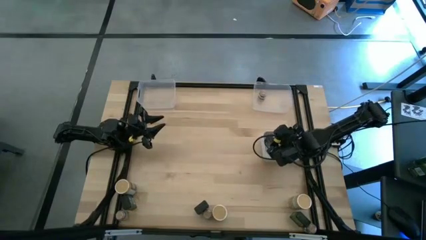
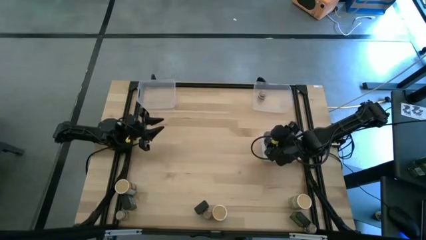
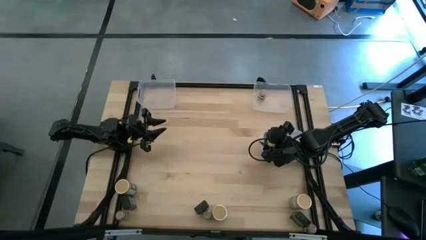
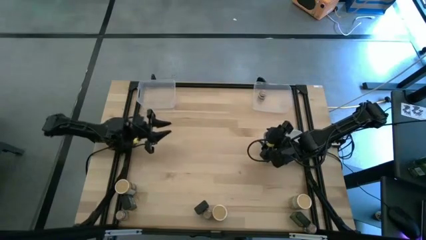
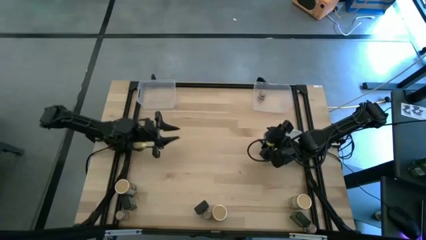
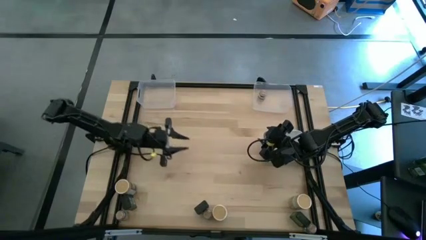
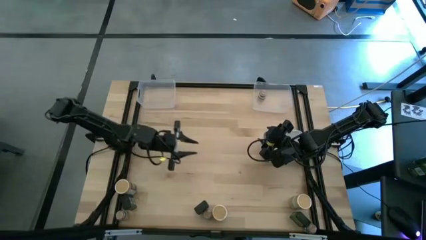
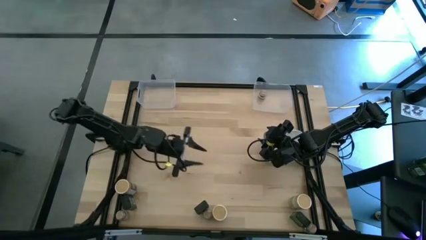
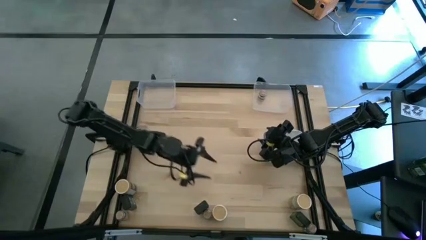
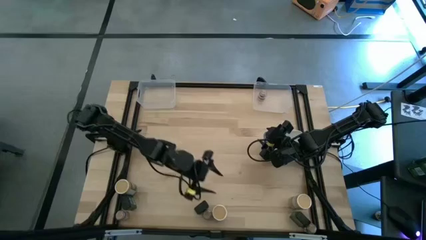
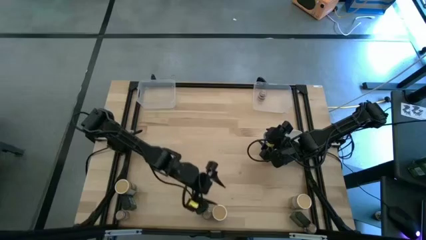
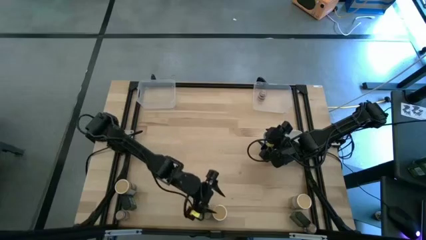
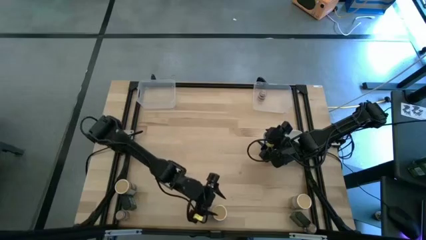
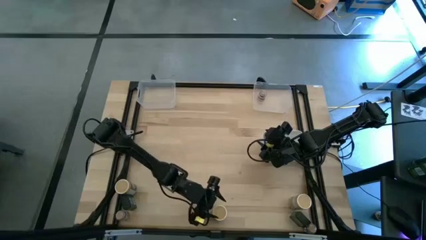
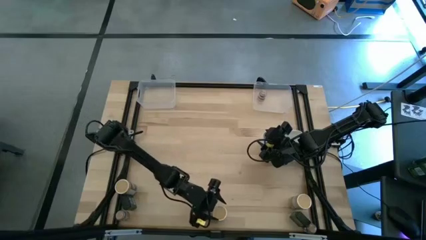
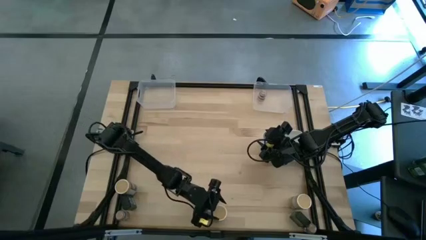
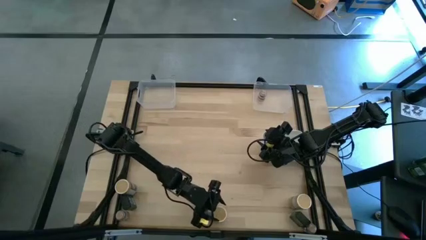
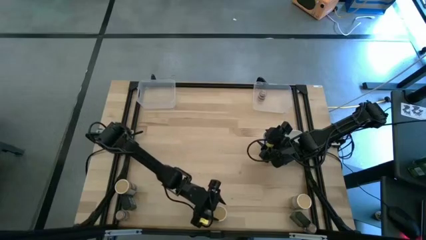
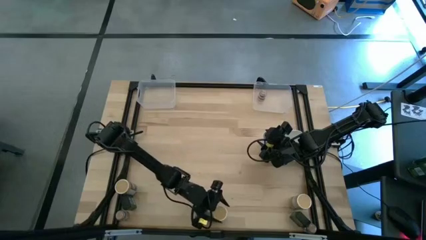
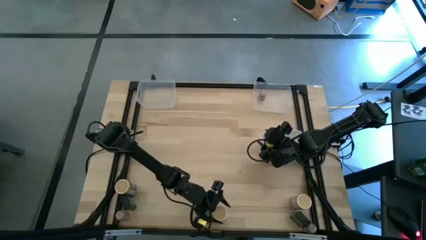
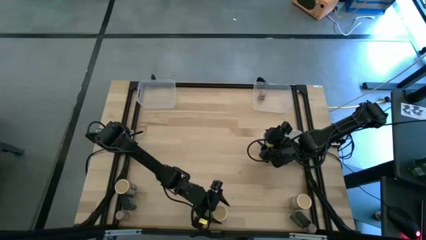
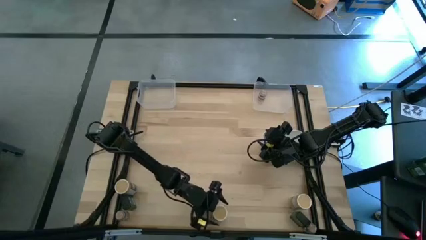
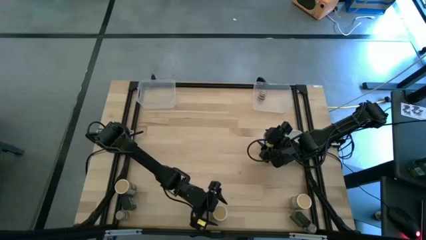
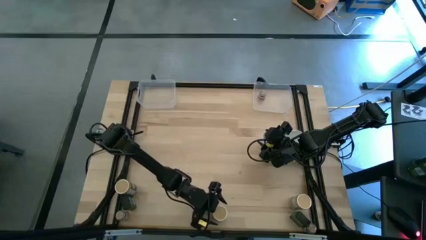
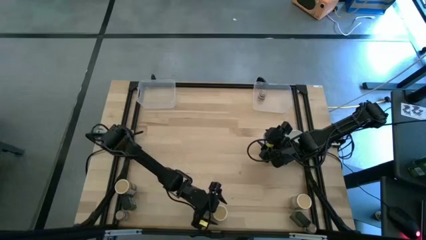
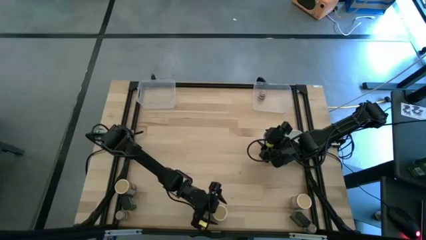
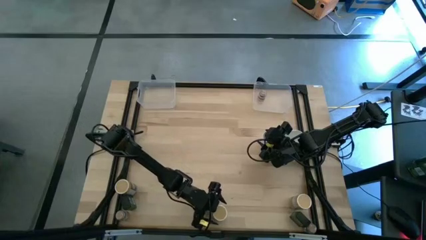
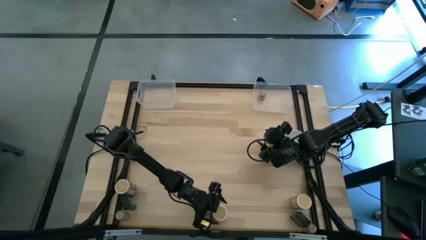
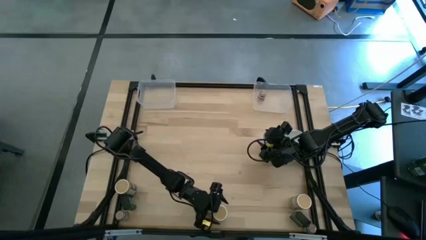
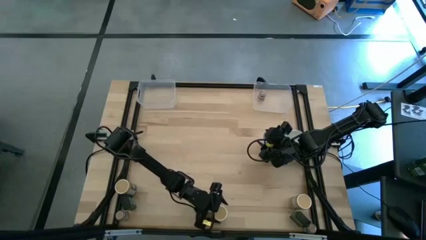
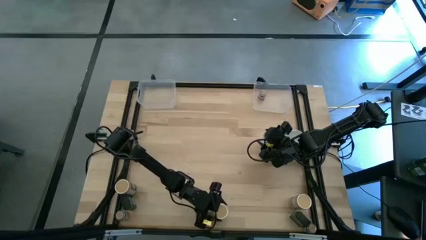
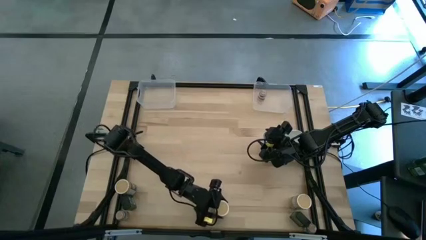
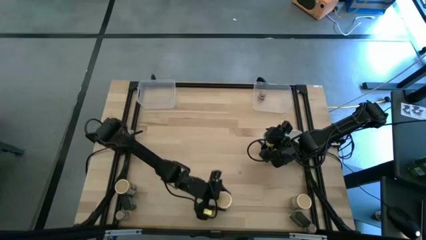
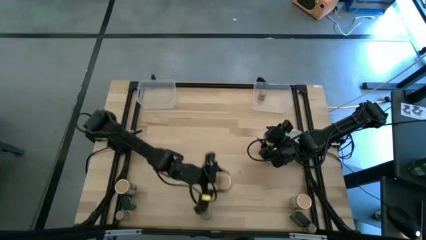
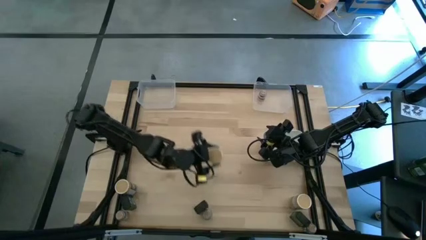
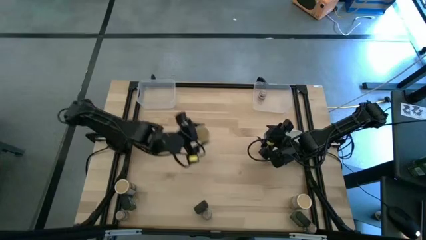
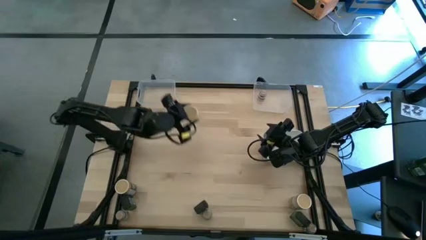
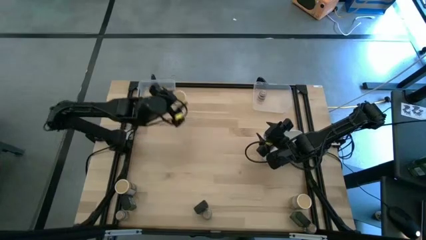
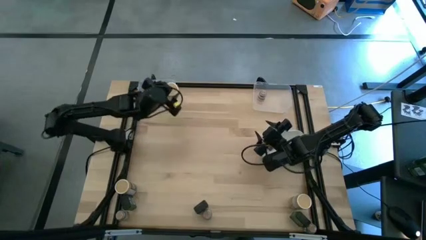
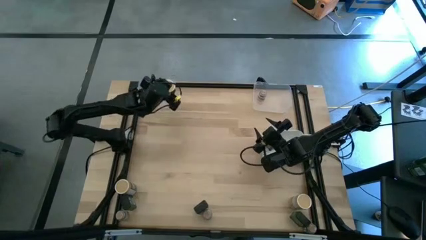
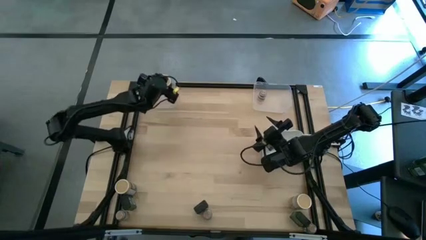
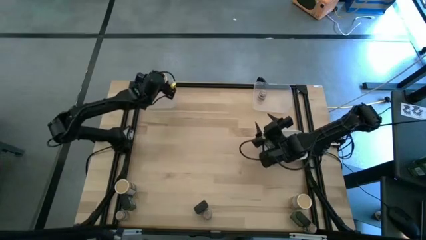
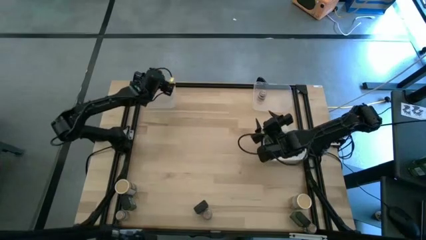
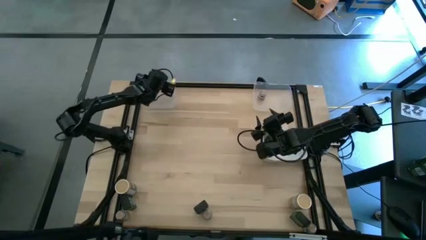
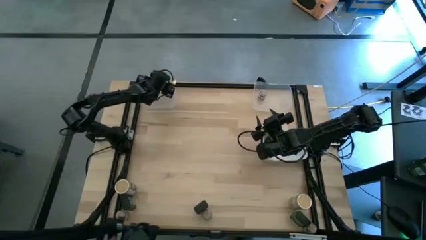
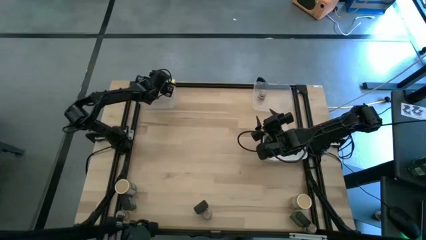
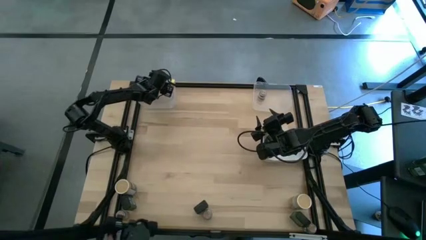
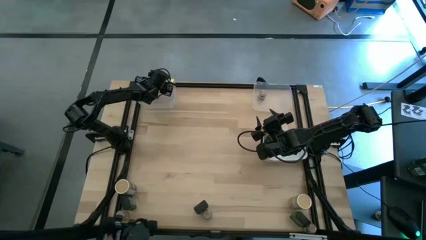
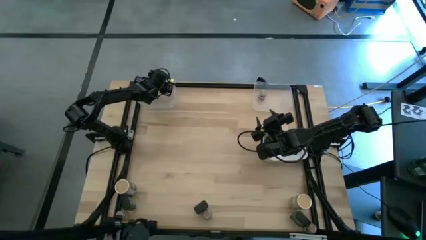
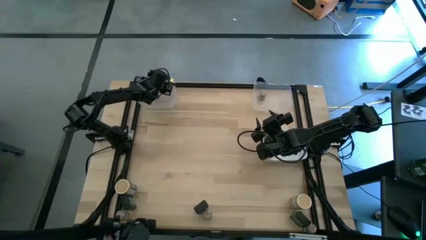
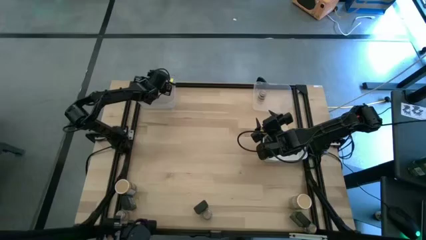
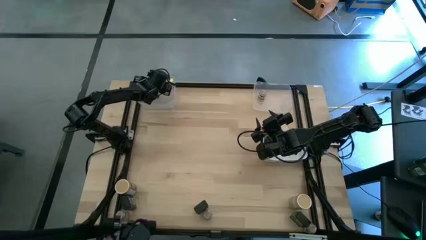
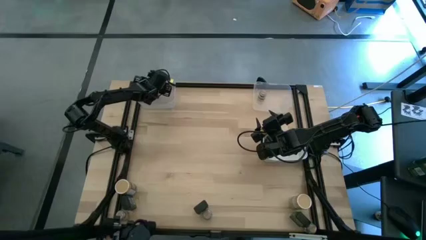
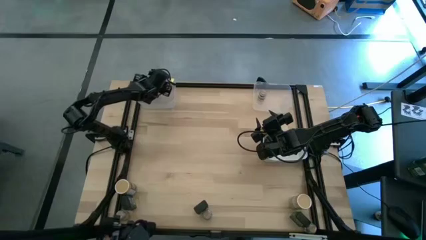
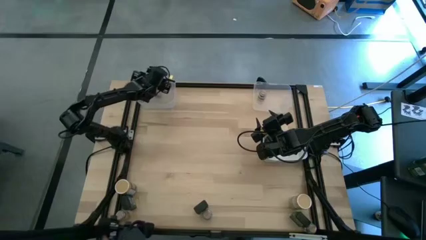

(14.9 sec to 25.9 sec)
Task: Sort spices by type
Put the middle cream brown seasoning bottle into the left transparent bin

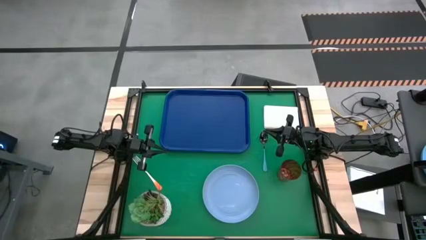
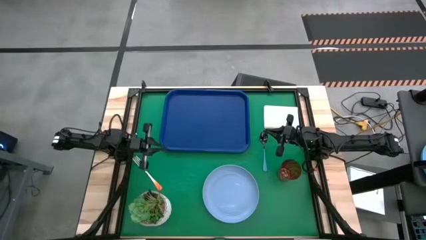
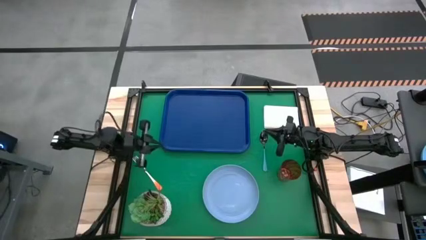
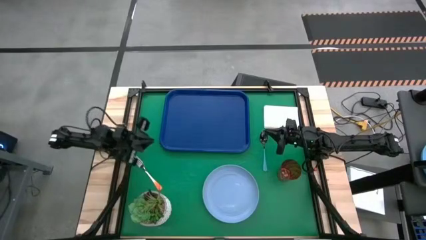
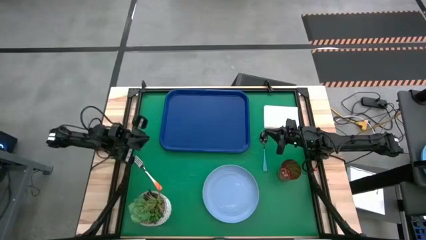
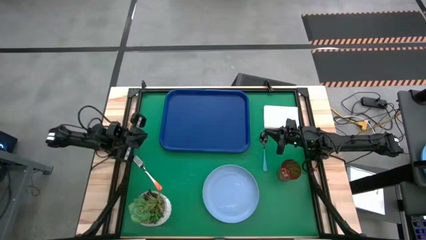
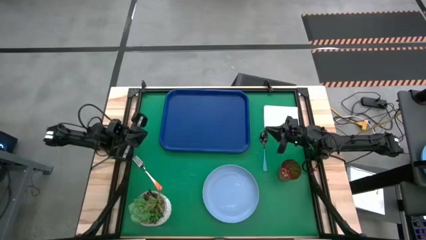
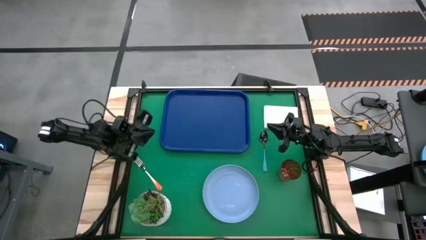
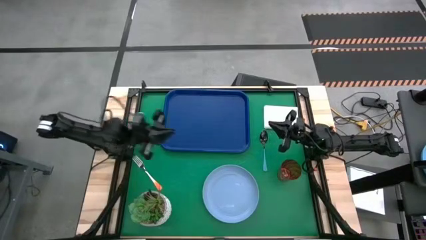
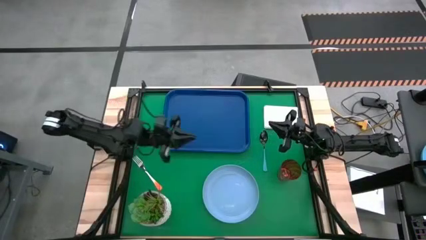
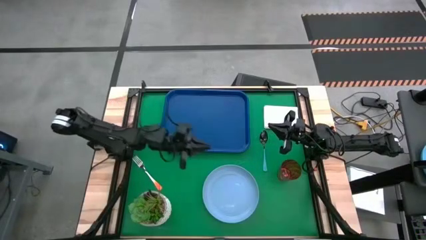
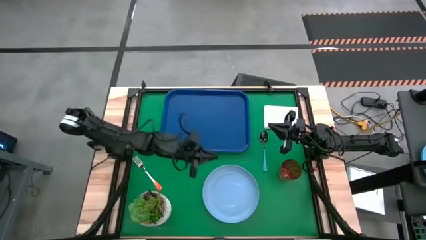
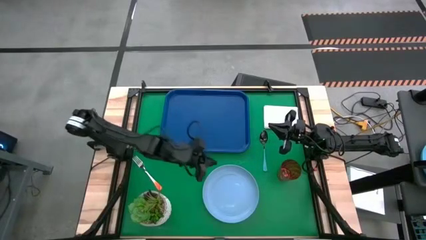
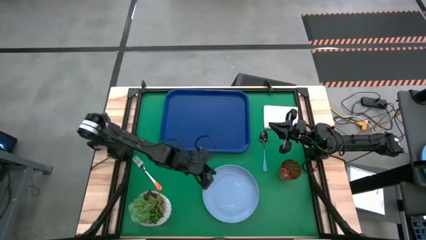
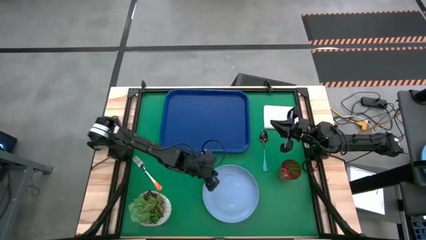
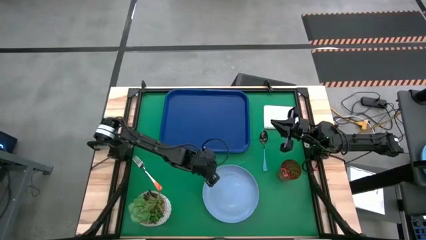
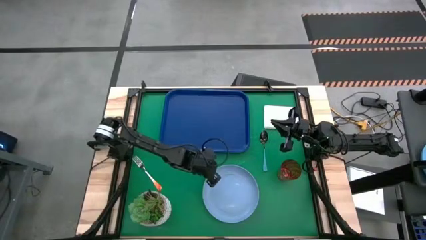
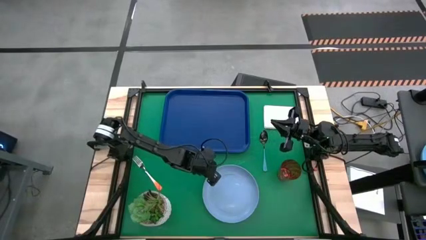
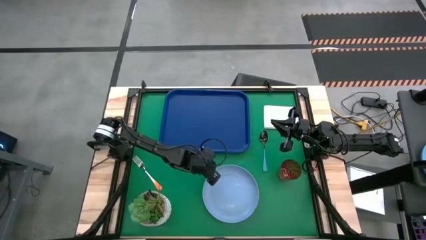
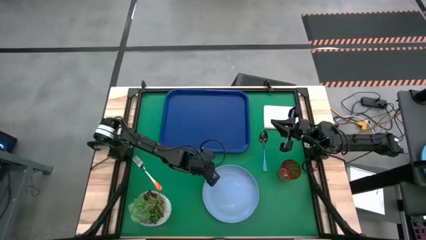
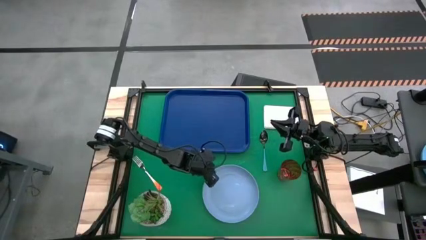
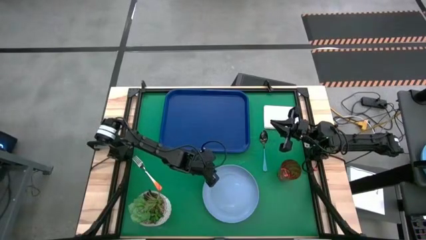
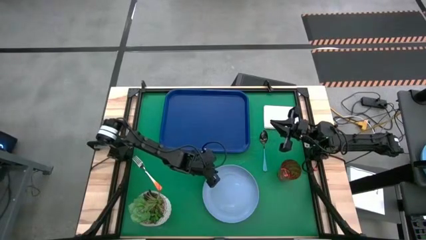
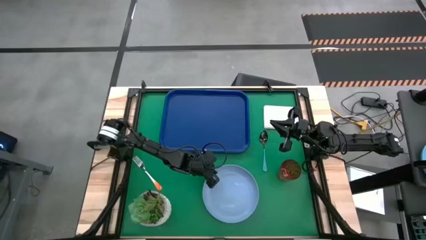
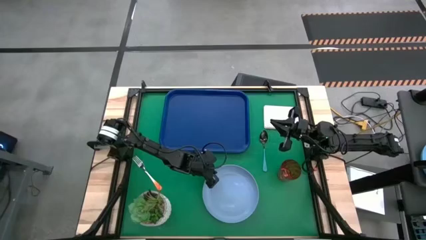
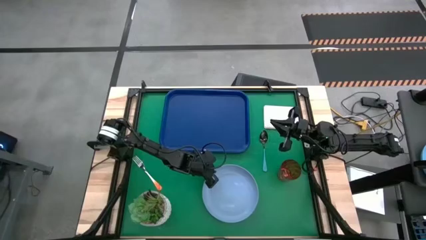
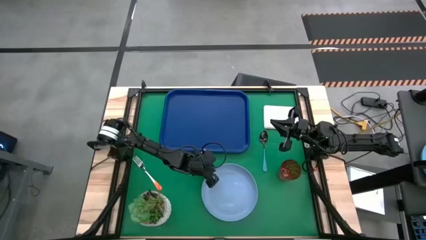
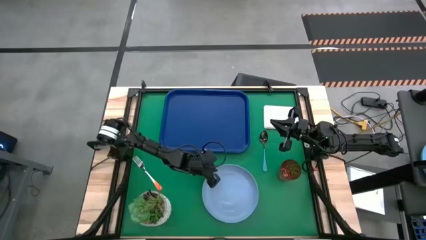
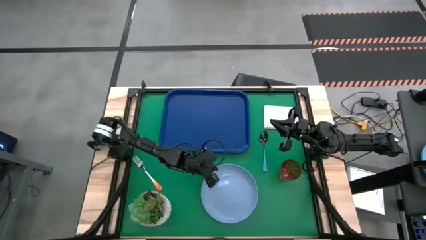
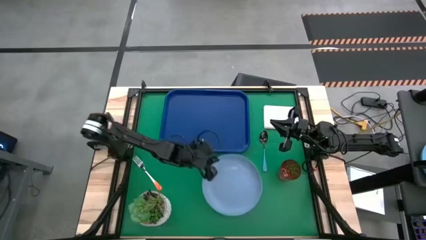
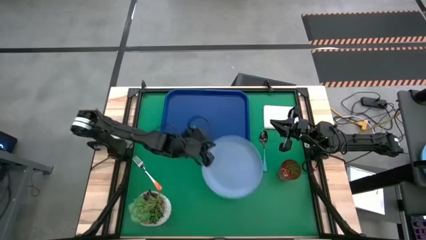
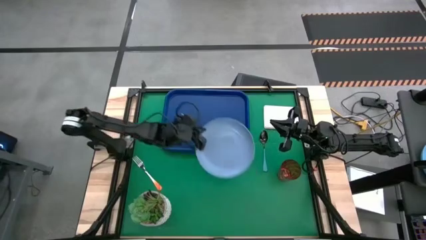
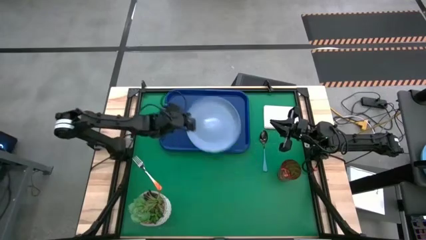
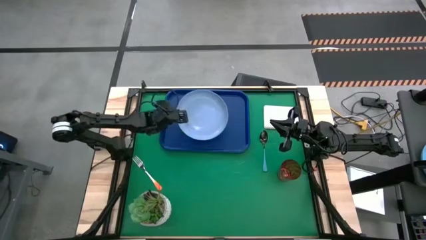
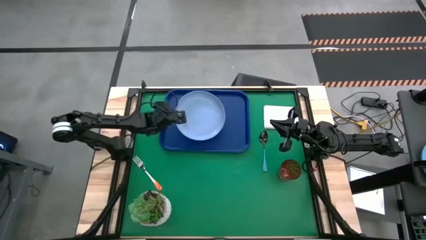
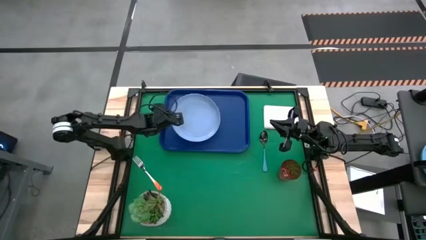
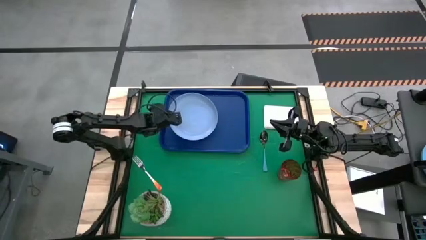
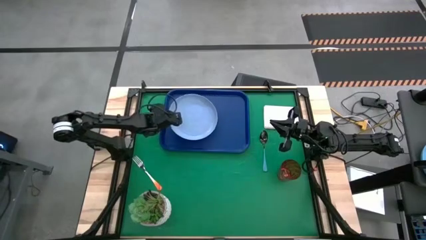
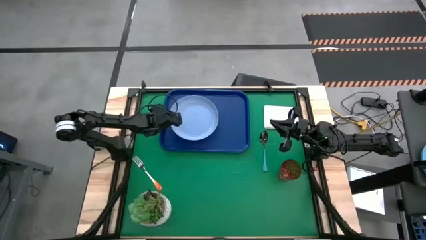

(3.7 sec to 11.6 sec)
Task: Pick and place plate/cup/fork/spoon on tray
Put the blue plate on the blue tray
